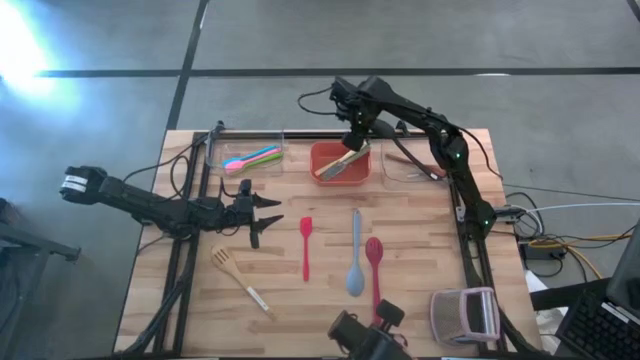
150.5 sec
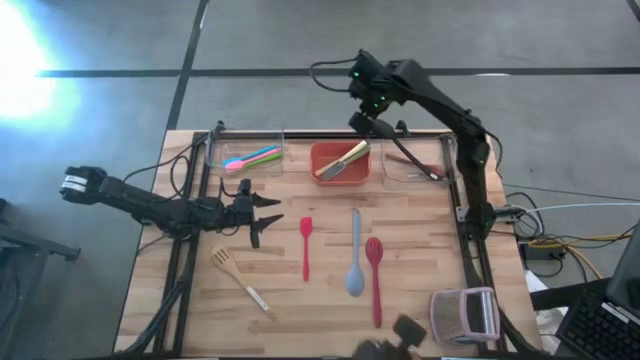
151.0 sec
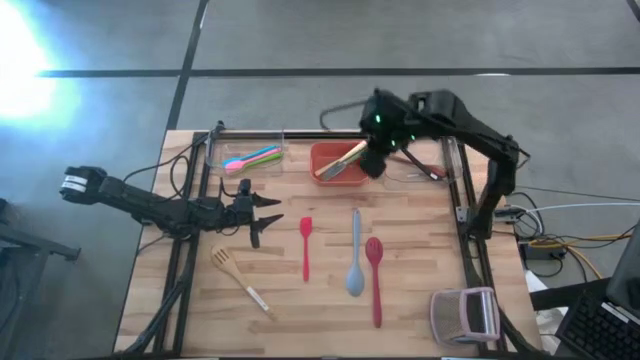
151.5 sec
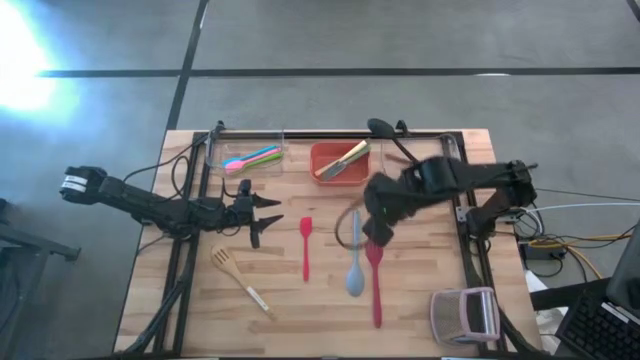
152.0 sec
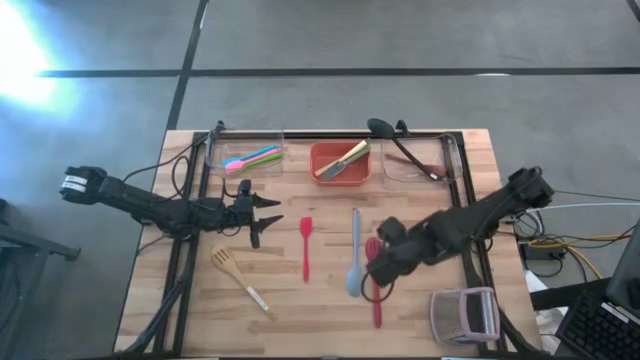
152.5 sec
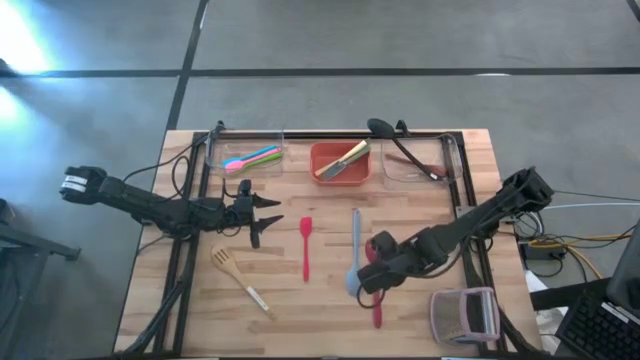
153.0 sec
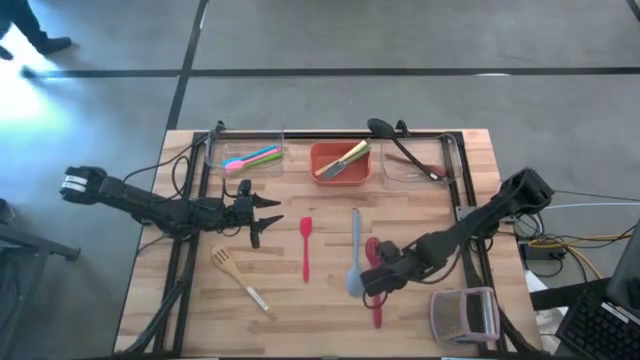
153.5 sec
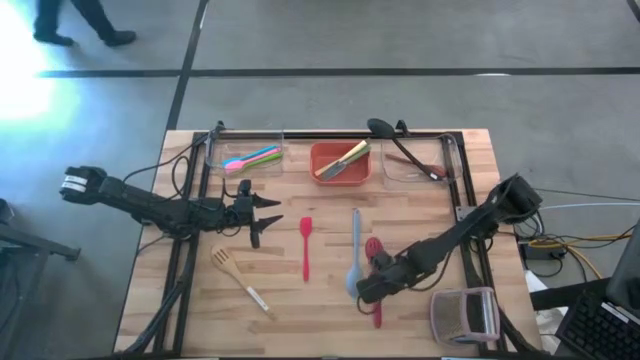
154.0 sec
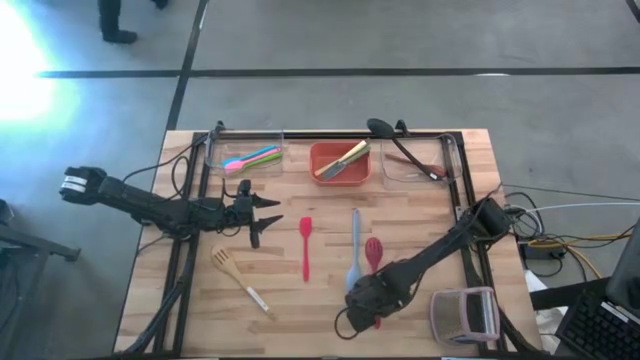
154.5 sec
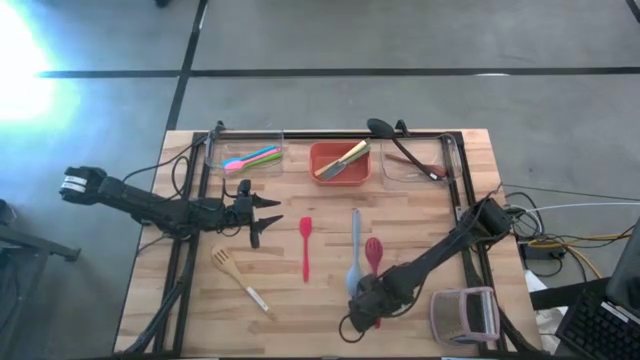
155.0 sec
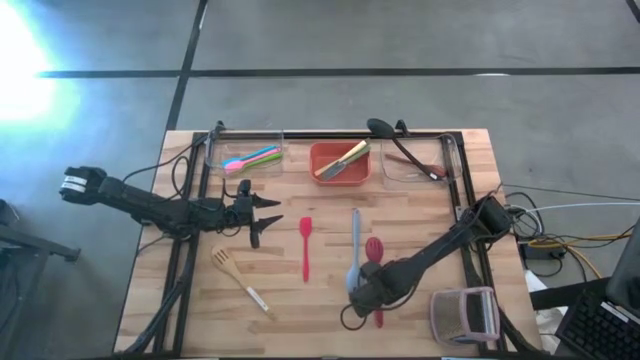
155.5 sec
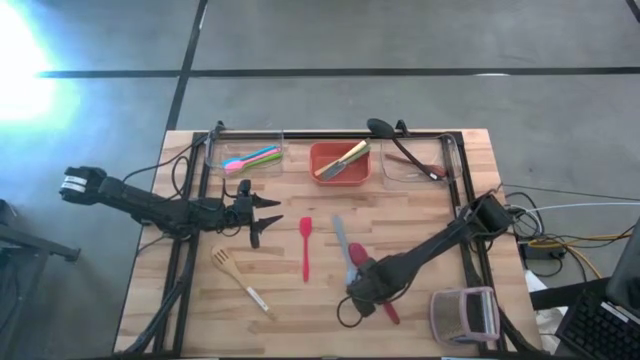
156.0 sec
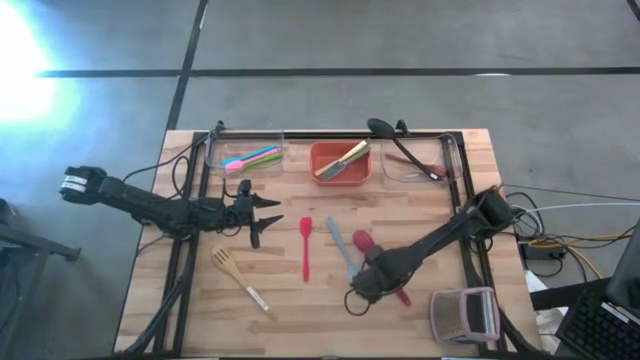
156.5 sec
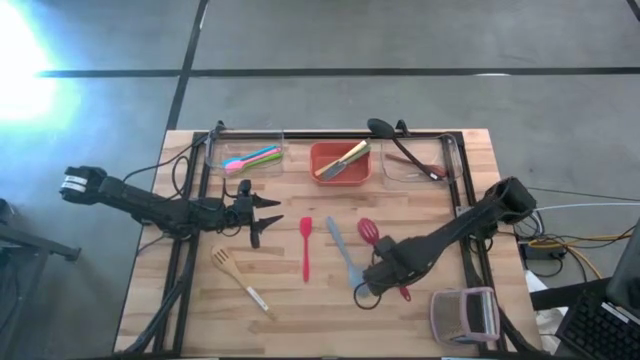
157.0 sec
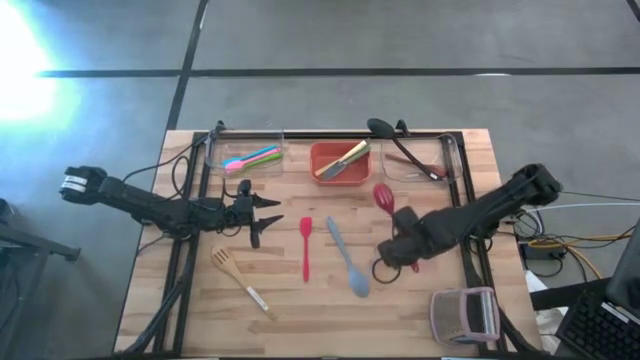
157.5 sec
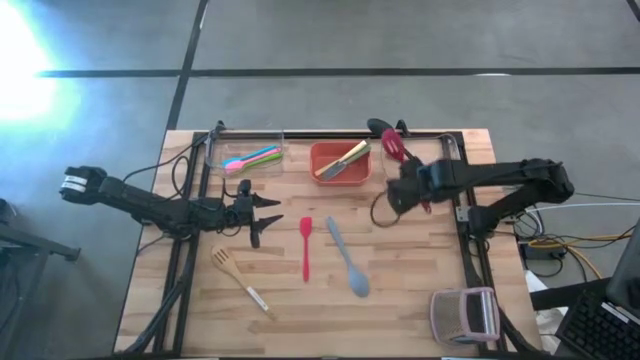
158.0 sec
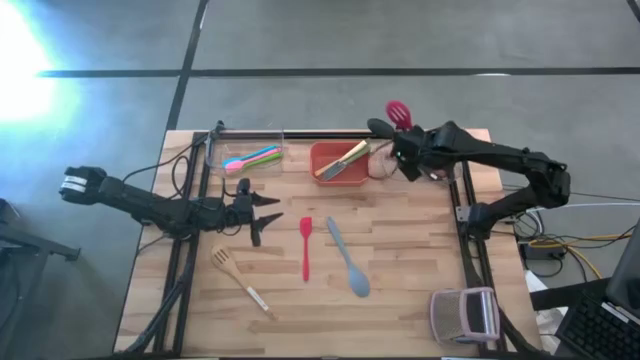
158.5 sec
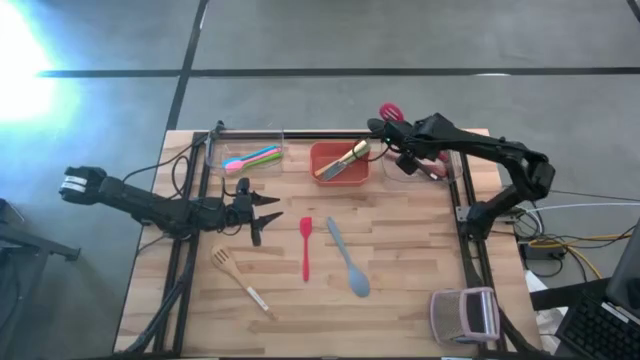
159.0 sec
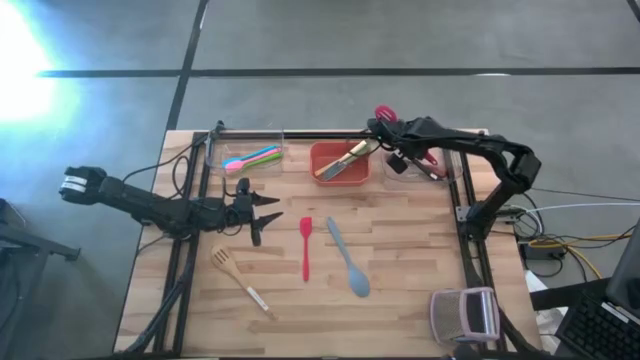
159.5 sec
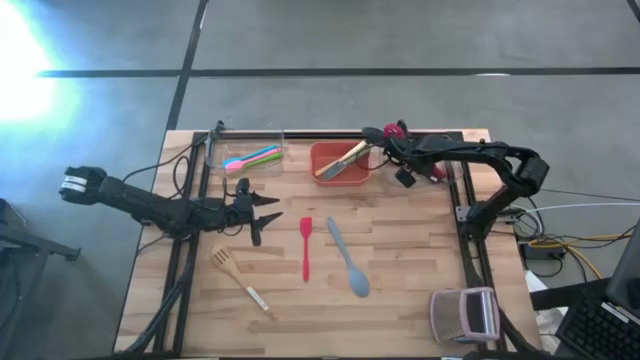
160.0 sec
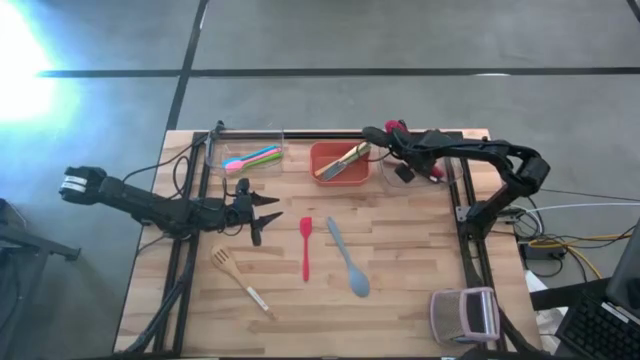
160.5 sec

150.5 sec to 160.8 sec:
Task: Pick & Place Kitchen Items
Put the red serving spoon into the right transparent bin

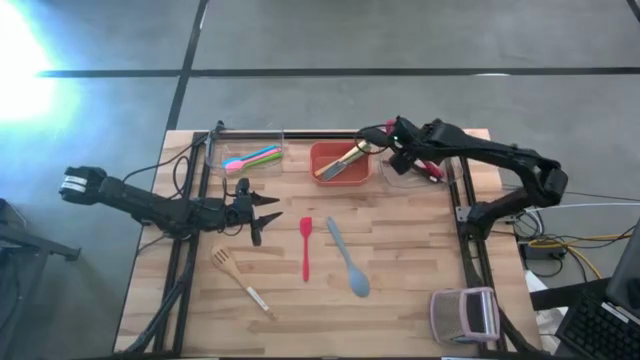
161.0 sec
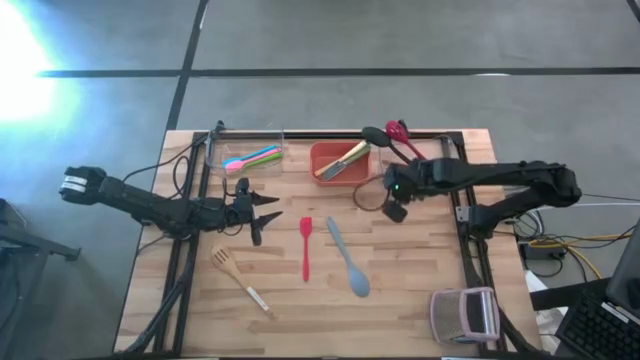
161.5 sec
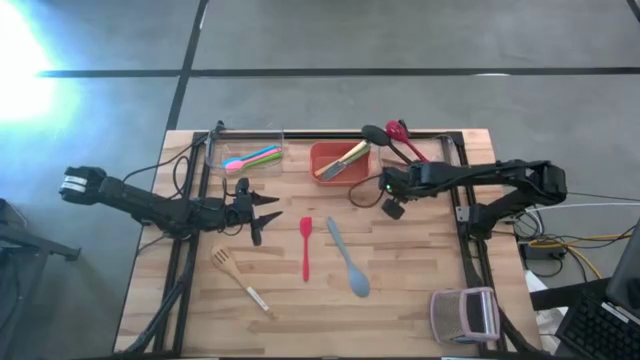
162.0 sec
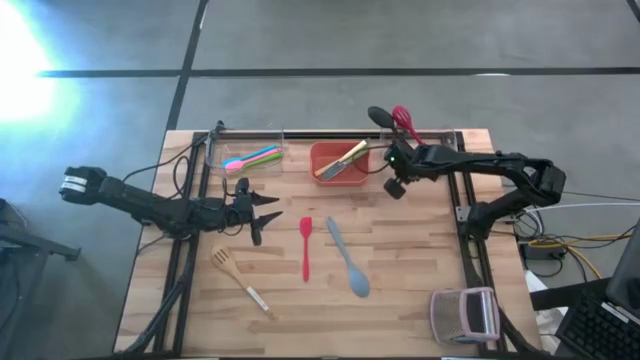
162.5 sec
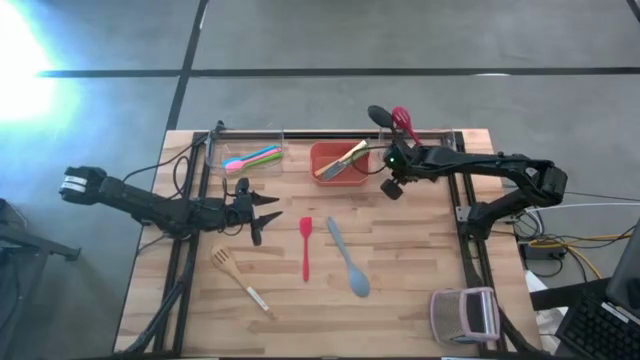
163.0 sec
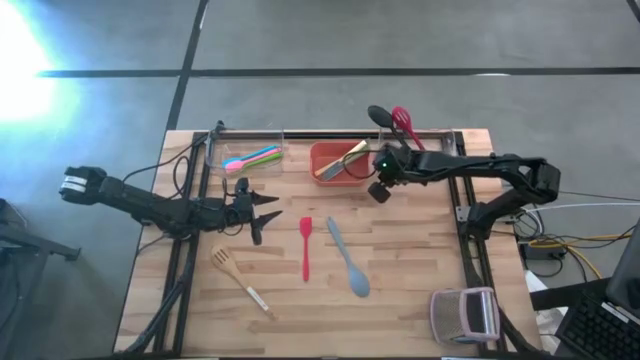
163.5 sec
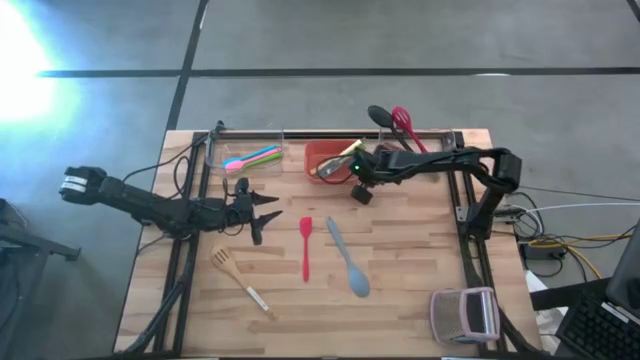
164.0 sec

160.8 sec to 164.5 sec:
Adjust the bins

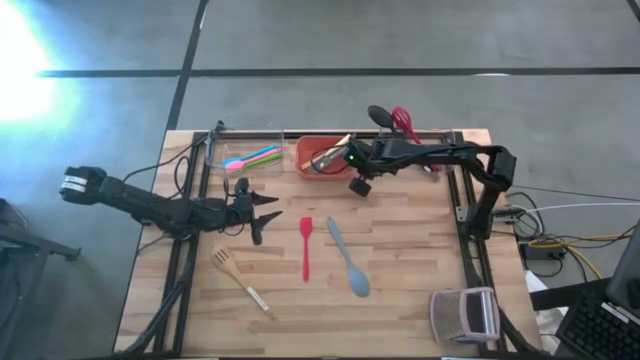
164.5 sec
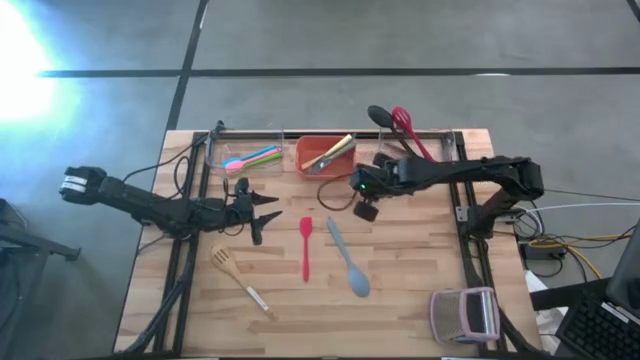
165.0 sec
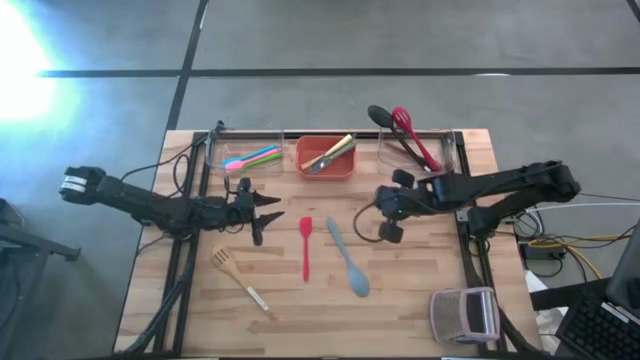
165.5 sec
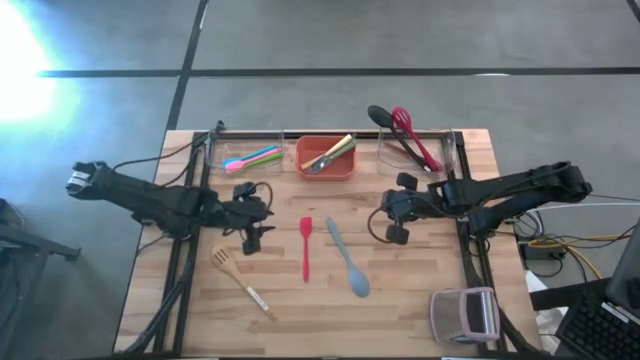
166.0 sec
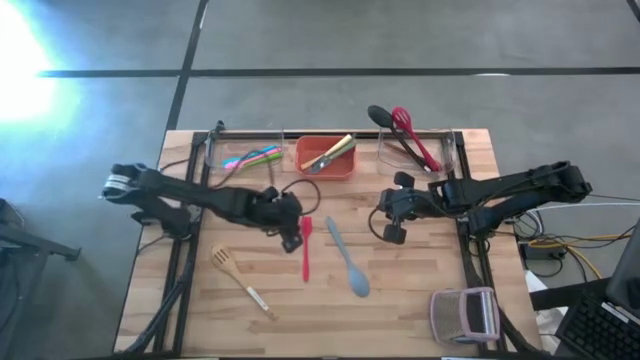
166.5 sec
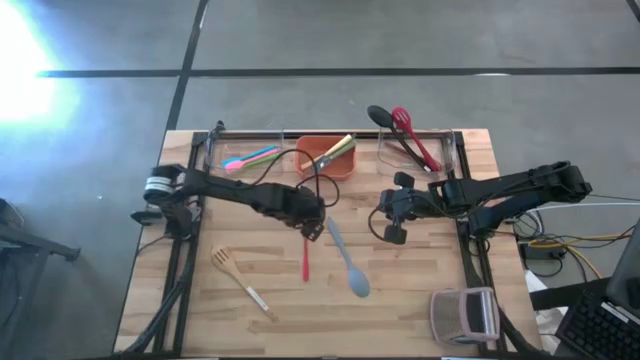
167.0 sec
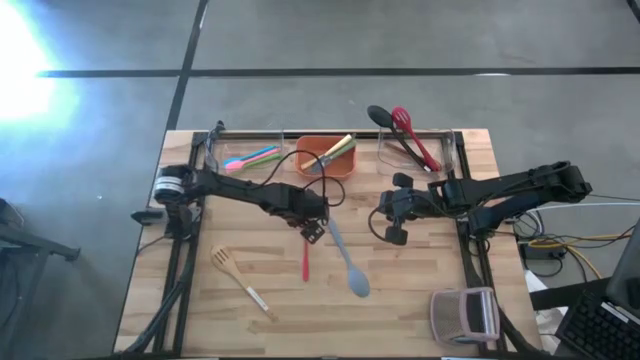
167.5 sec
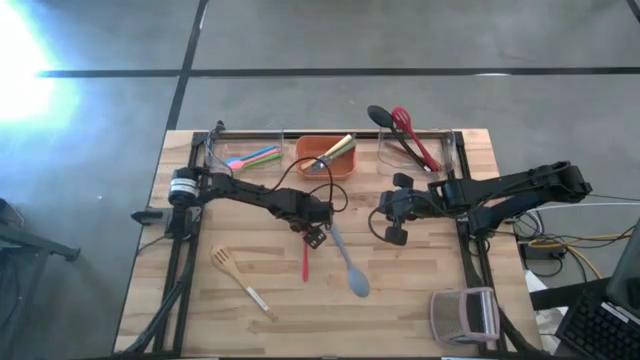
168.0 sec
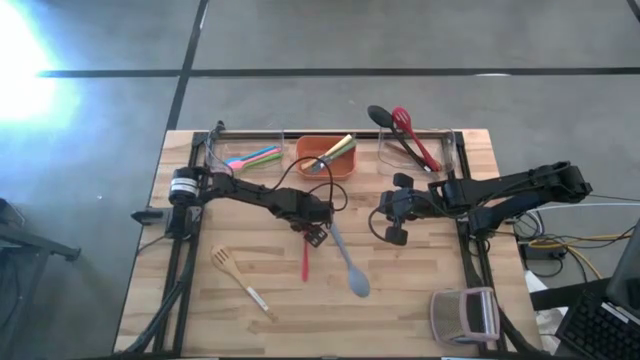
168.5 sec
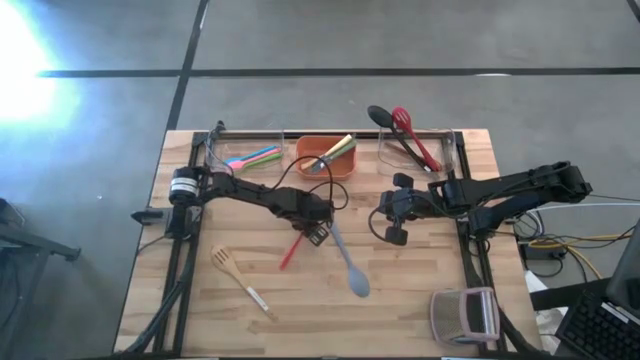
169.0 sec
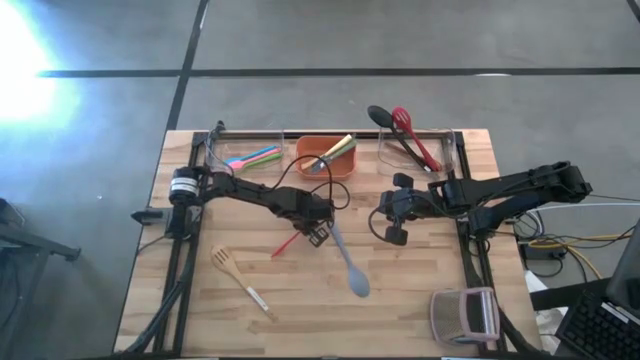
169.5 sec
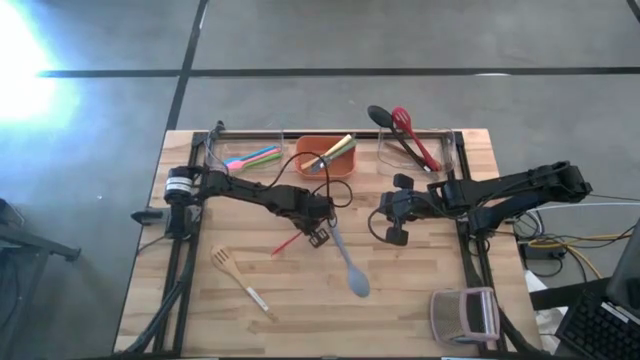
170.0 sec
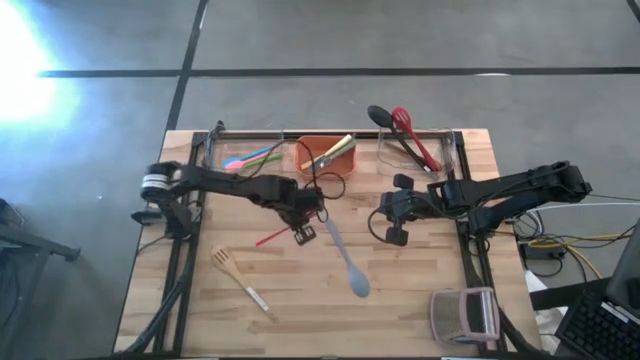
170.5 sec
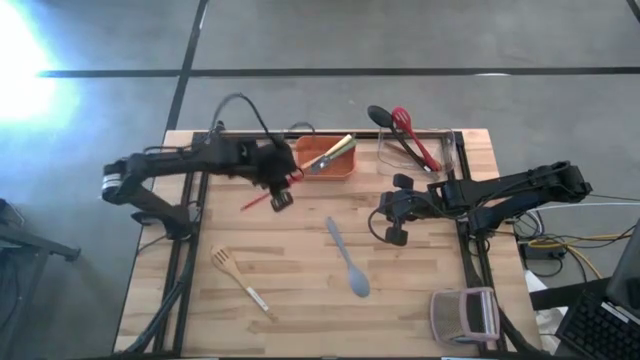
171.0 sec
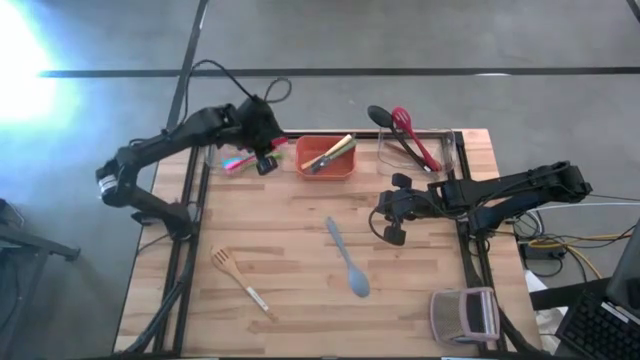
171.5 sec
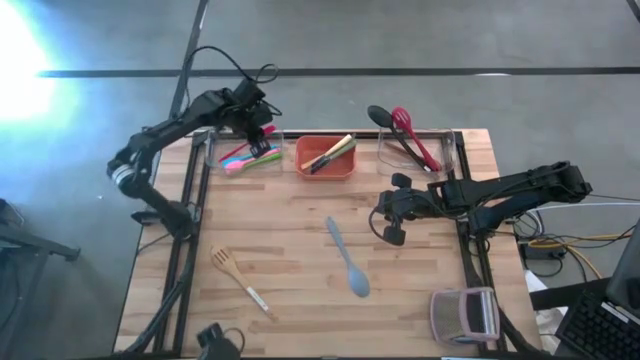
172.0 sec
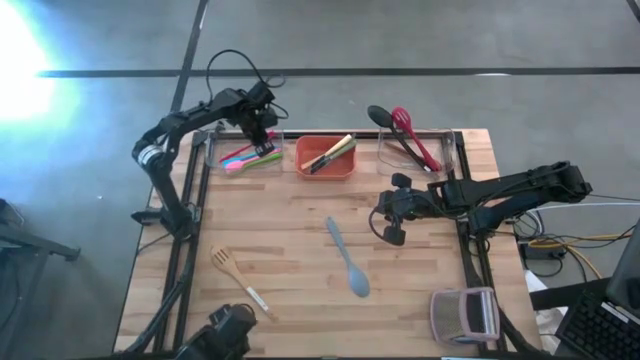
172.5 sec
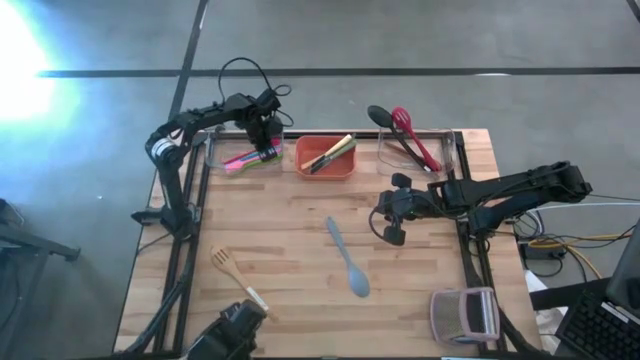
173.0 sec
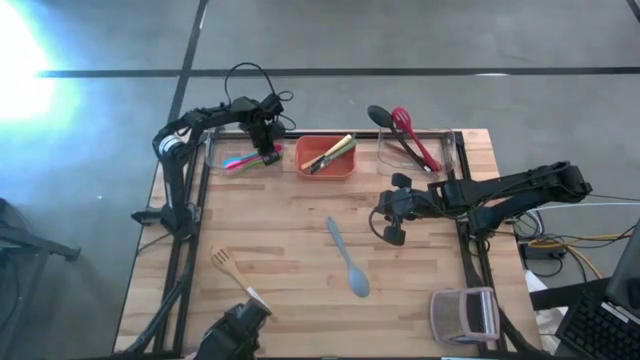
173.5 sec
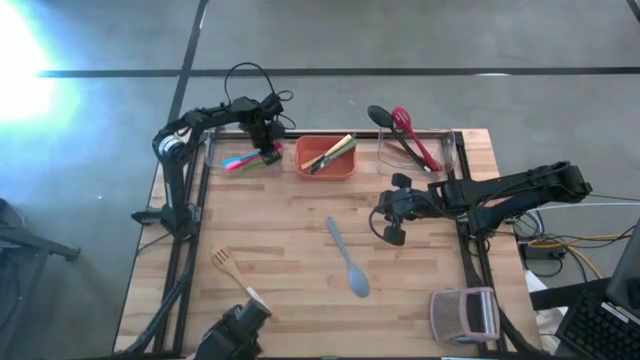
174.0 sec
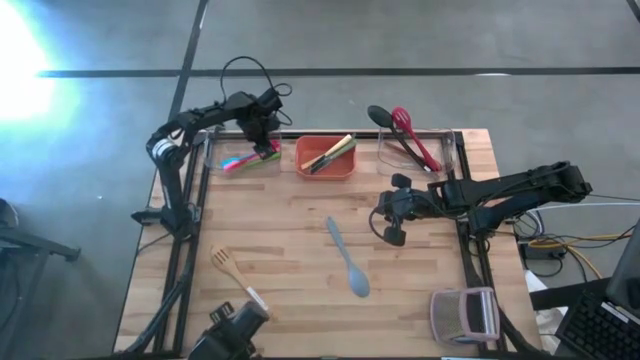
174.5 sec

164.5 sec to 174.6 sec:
Put the red spatula into the left transparent bin
